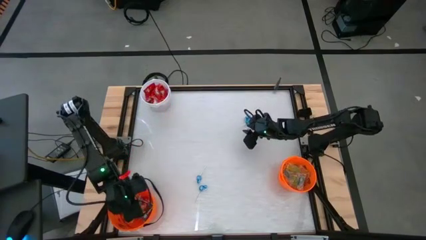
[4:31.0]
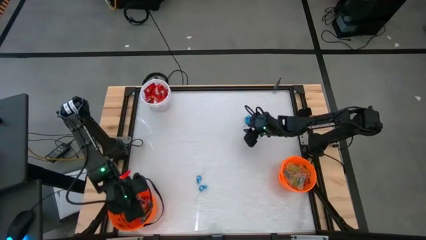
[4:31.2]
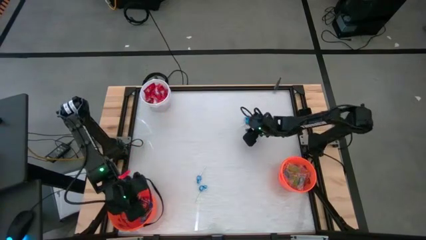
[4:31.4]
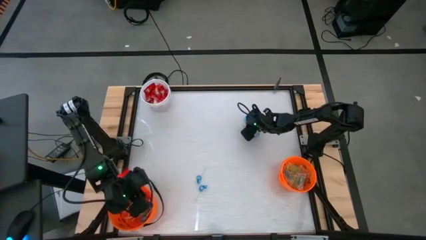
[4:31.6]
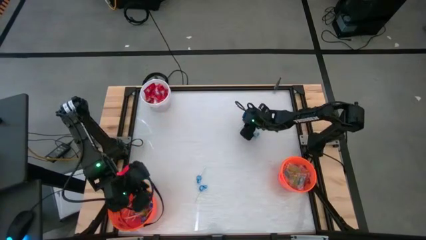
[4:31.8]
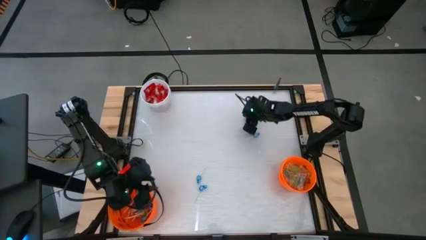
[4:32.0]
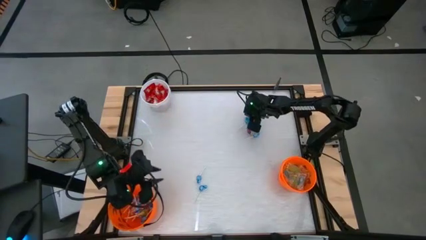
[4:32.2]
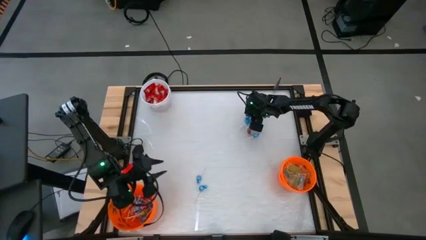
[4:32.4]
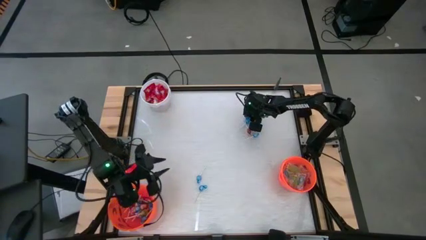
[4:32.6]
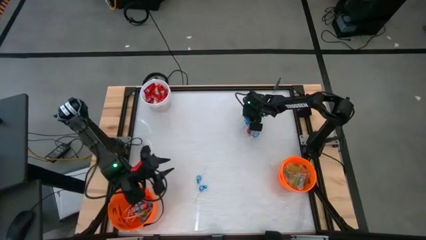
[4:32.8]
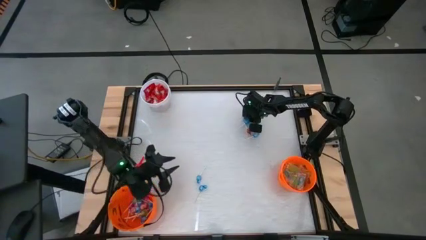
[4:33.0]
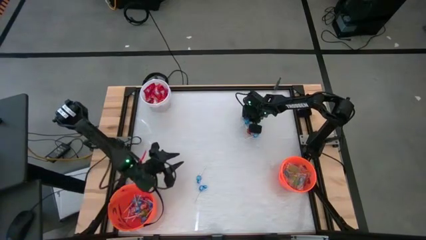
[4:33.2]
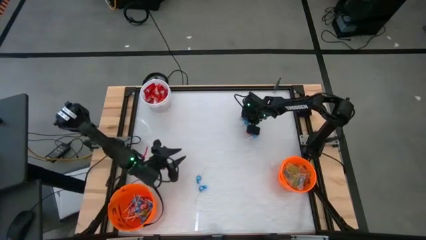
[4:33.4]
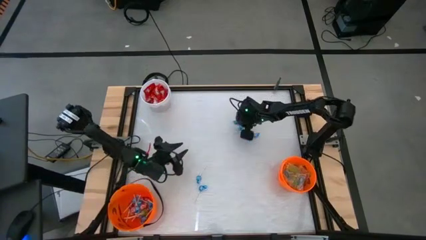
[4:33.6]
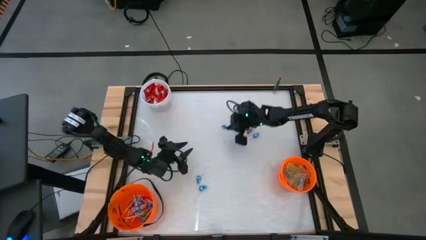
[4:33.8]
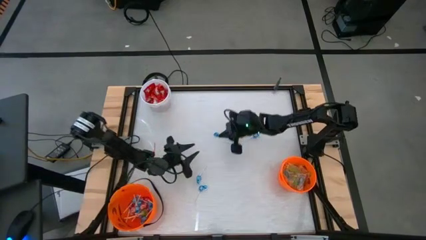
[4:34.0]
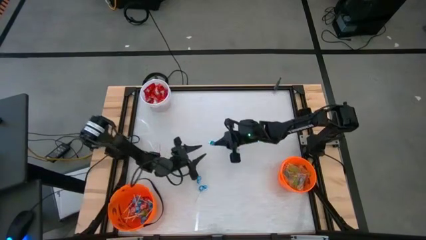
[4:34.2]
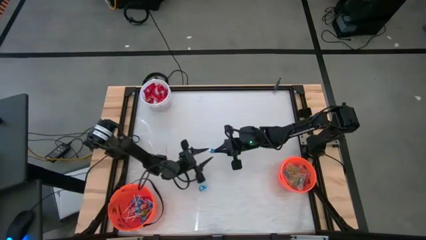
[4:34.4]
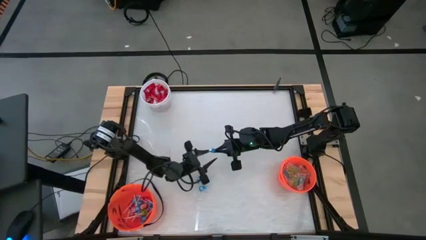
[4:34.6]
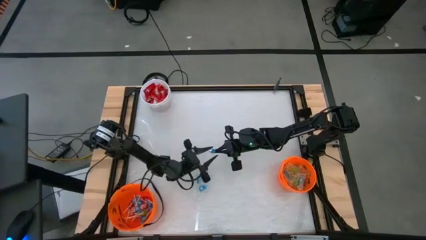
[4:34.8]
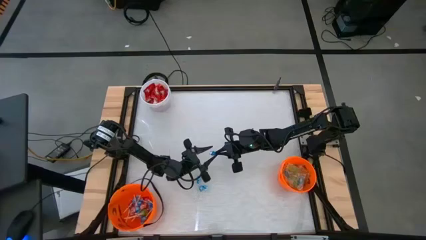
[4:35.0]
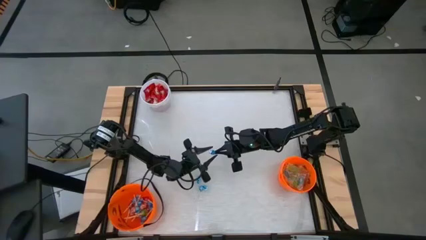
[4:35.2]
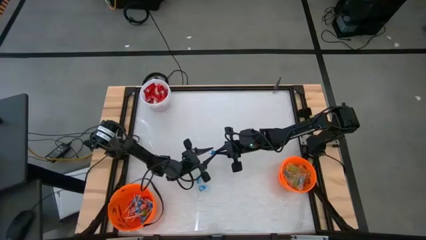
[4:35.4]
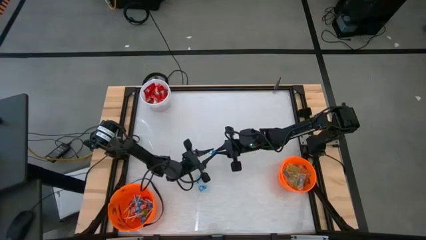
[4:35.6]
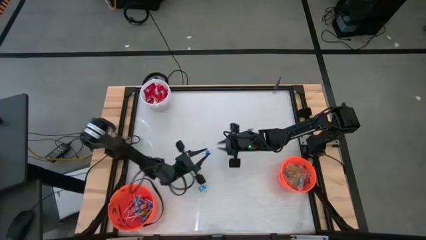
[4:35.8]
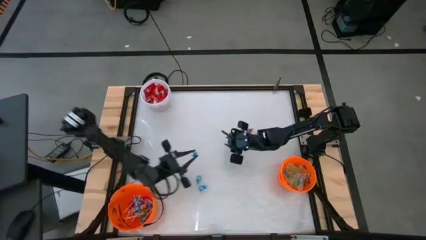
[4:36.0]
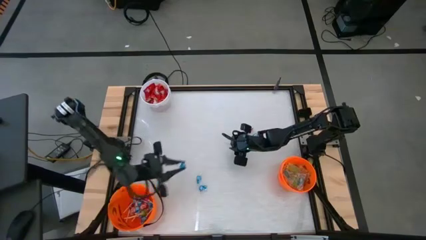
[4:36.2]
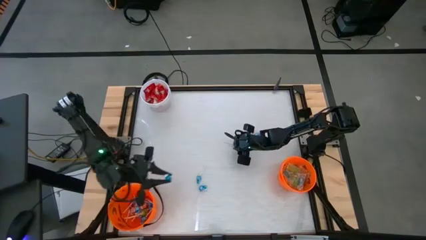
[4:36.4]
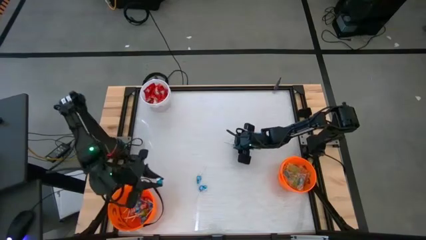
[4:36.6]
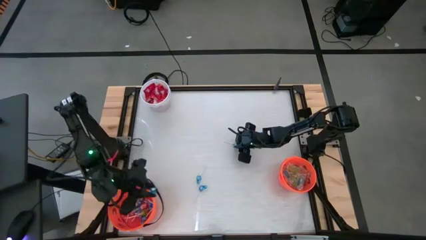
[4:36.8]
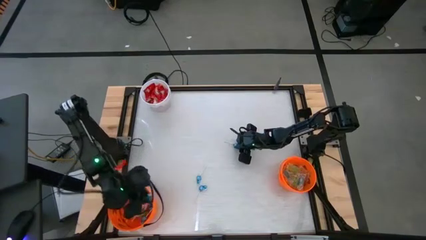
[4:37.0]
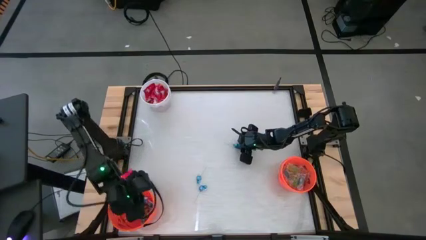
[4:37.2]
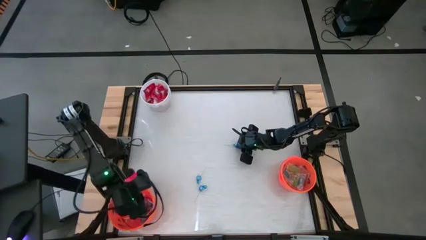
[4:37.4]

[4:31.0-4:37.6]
Task: Sort candy by brand, put in halloween buckets
Put the blue sucker into the left orange bucket

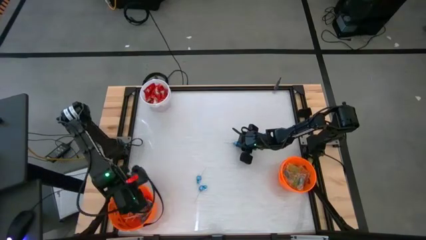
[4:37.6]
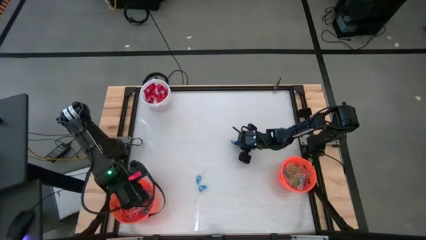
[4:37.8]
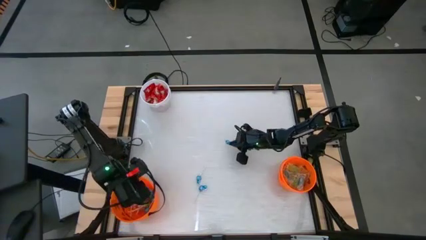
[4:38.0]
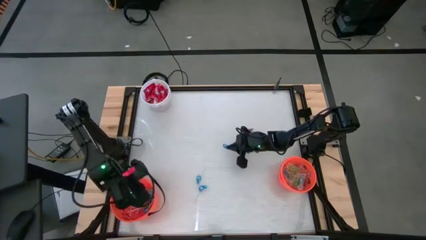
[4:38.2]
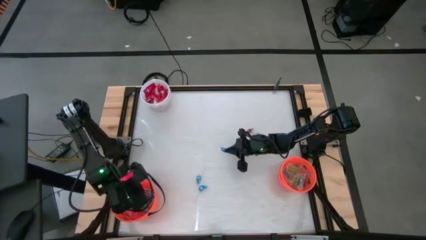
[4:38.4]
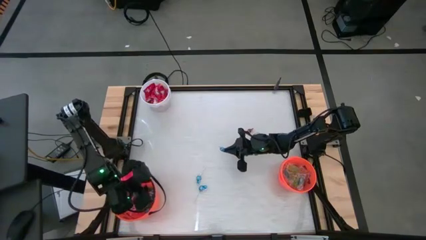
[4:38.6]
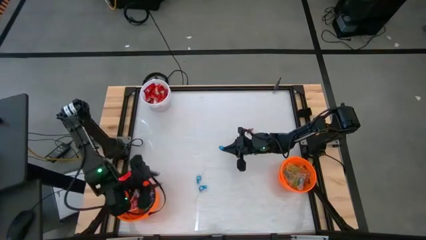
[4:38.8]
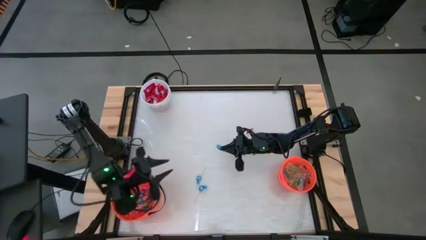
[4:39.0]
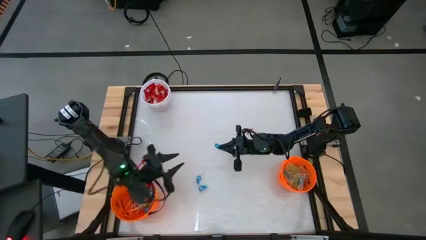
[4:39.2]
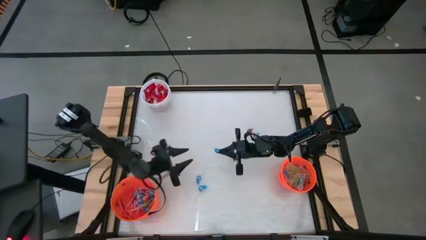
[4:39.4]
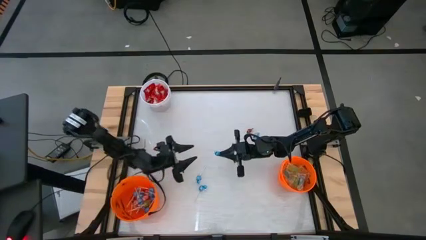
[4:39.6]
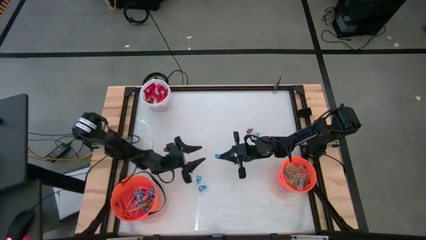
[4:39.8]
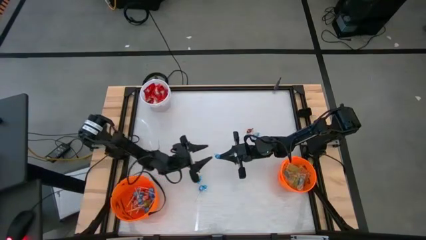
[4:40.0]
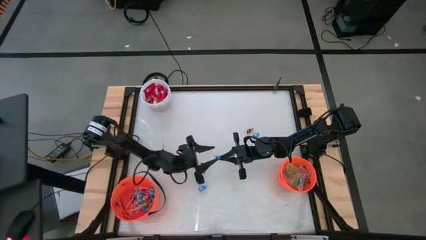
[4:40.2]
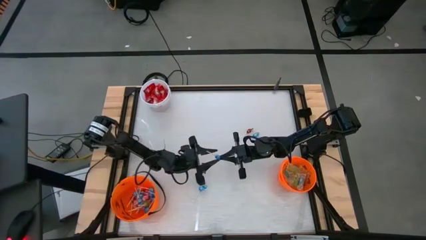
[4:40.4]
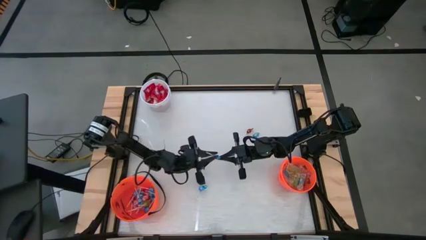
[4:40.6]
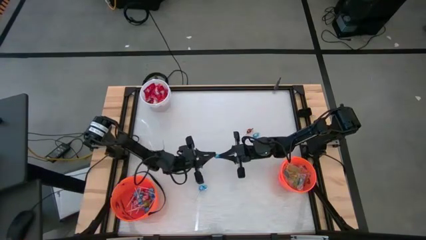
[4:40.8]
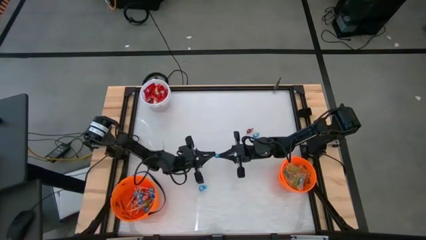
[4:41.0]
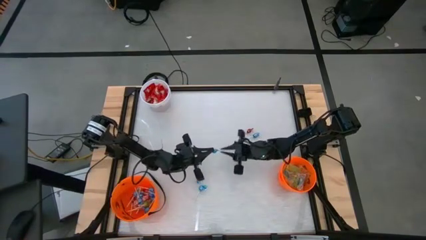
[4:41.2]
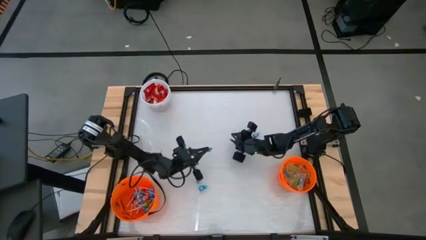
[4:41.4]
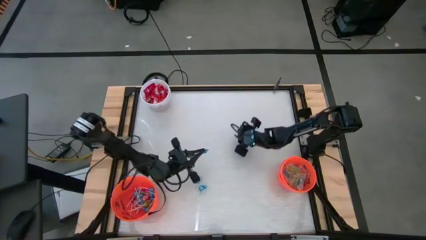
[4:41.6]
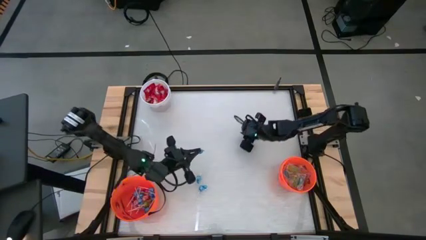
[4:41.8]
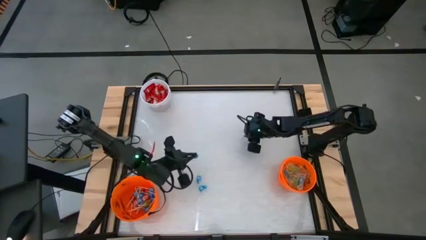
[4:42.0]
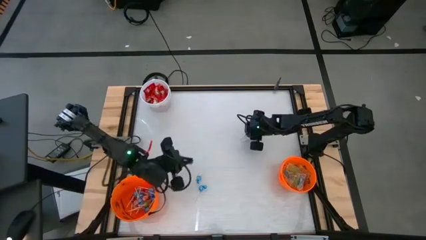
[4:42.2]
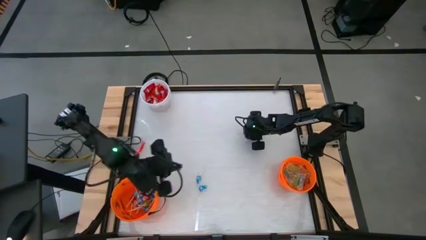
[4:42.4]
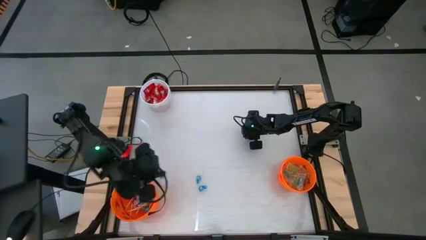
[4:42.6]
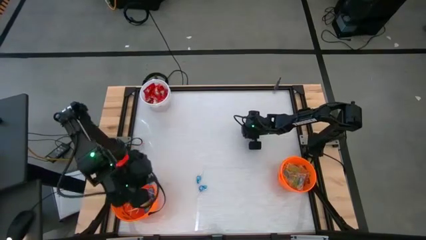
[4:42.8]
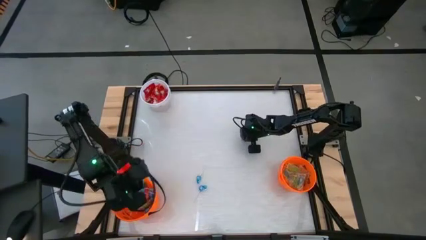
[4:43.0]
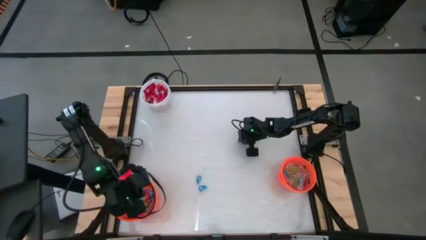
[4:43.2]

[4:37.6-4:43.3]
Put the blue sucker into the left orange bucket

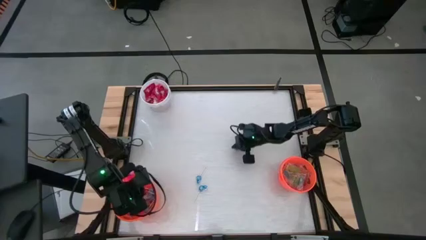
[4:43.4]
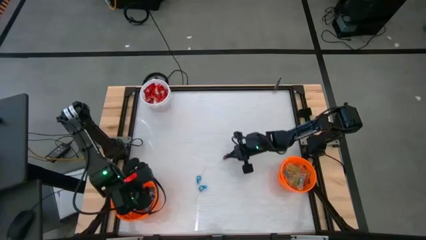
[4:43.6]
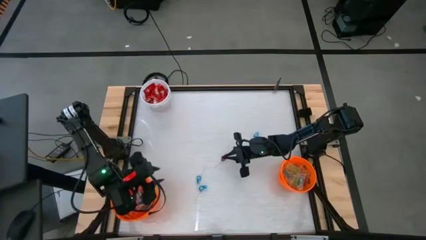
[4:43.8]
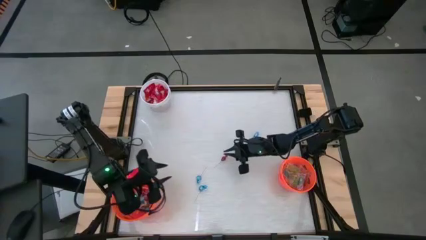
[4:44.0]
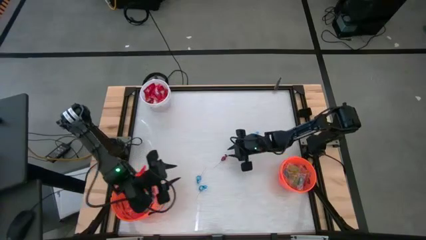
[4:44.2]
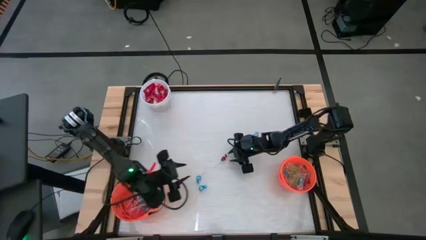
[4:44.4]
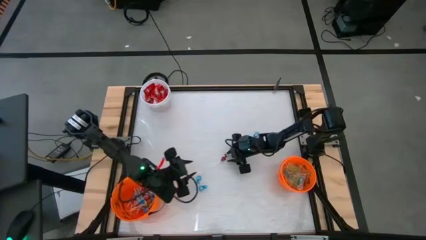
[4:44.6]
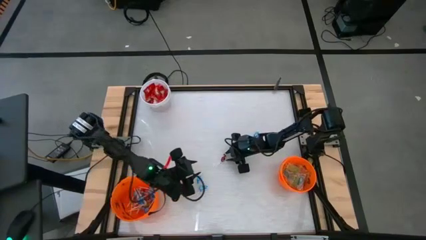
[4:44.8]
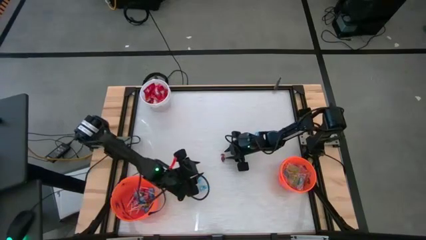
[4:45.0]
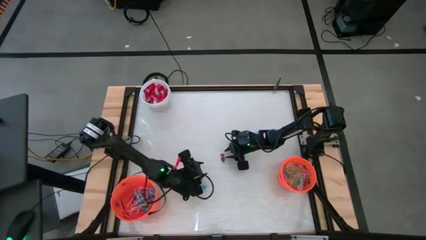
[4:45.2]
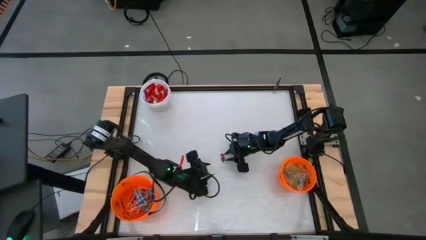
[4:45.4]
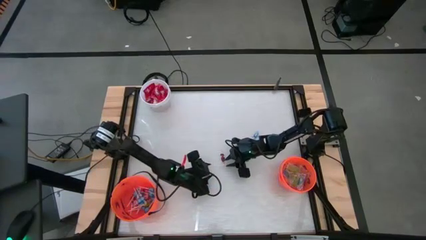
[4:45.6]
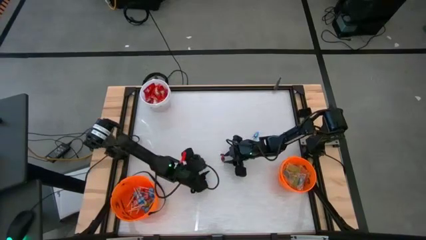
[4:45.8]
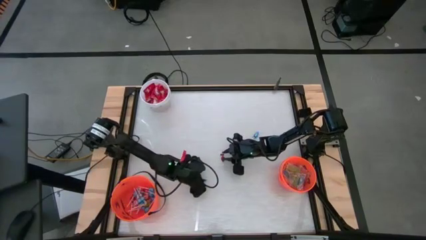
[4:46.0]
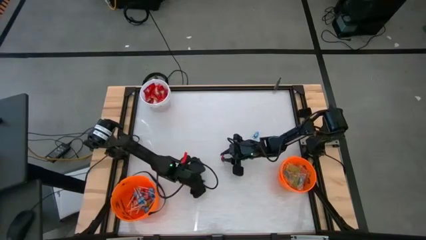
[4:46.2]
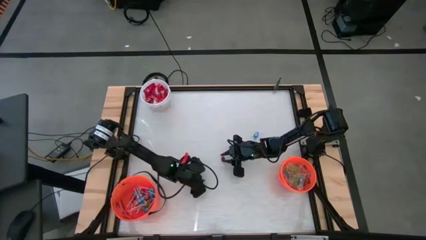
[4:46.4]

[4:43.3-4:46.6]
Put the middle blue sucker into the left orange bucket

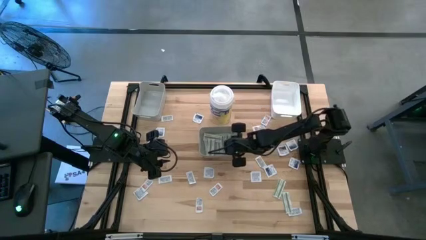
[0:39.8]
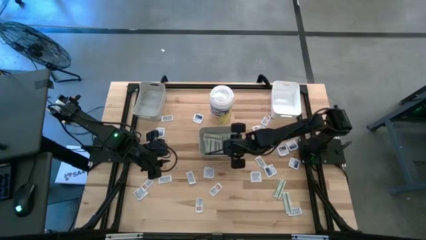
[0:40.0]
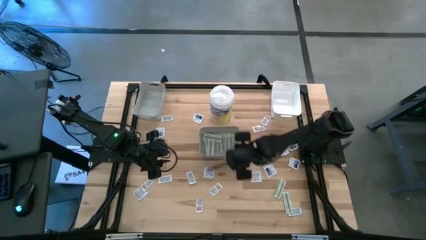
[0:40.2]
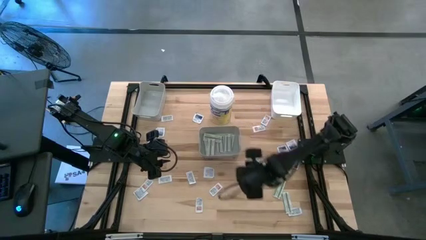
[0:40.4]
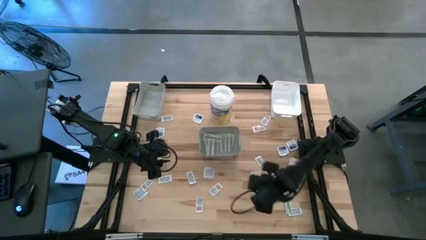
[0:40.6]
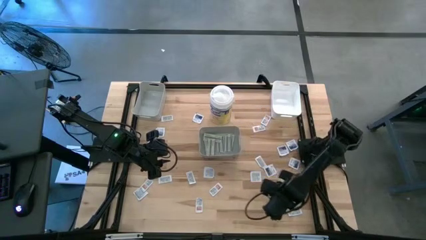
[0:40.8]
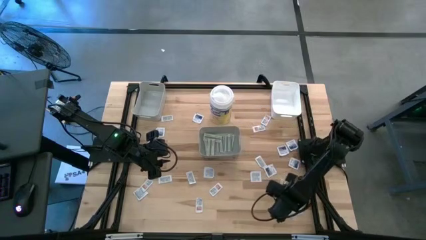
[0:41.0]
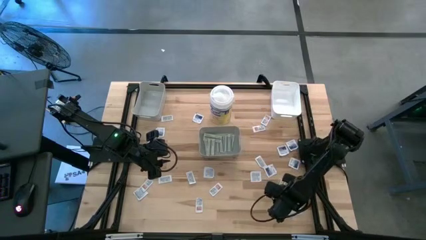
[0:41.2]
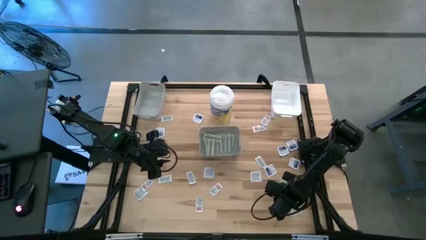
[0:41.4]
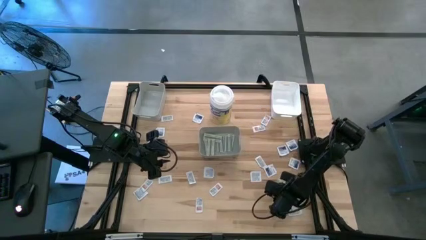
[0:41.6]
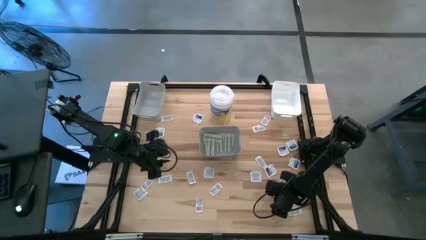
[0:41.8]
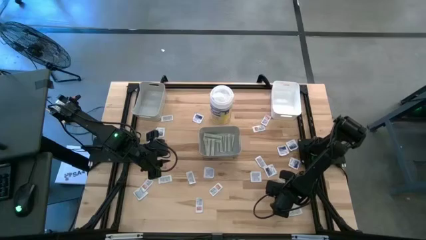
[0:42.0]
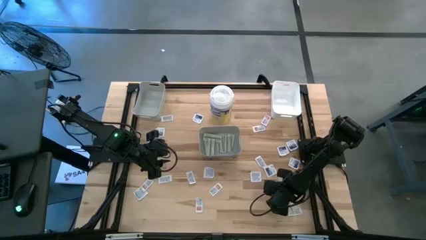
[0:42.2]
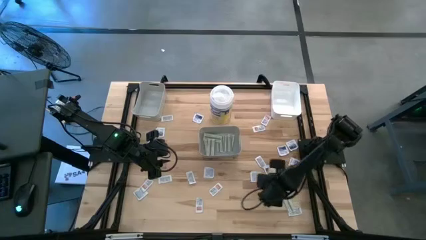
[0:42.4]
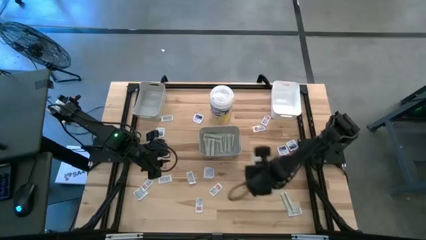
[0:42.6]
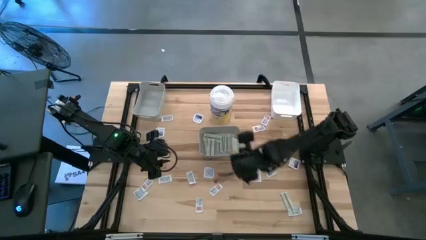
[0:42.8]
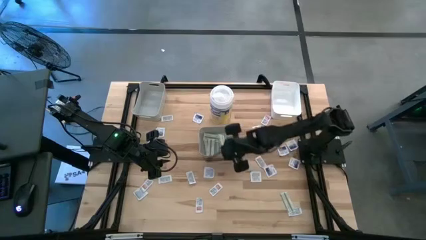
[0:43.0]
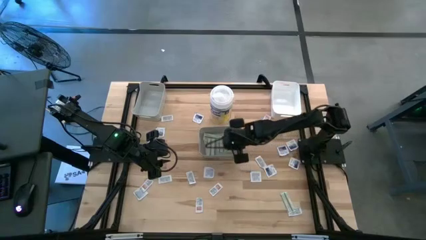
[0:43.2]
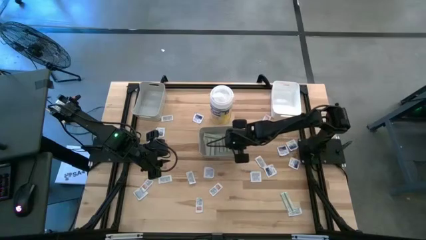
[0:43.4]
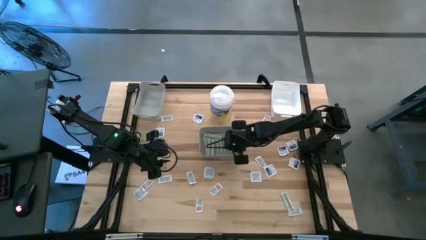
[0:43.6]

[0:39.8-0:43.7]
Task: Pick & Place First Aid Supplies
Put the bandage into the bottom gray bin
